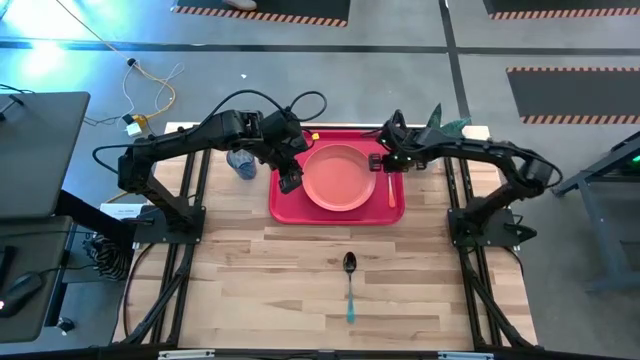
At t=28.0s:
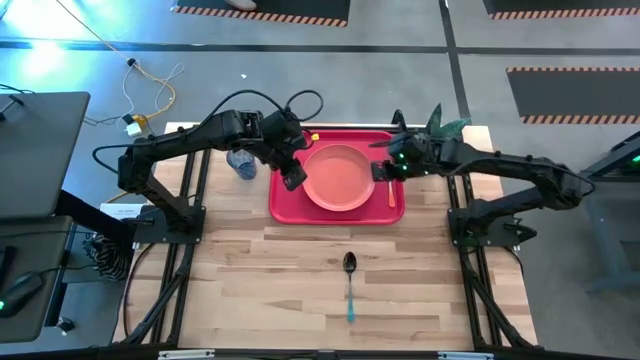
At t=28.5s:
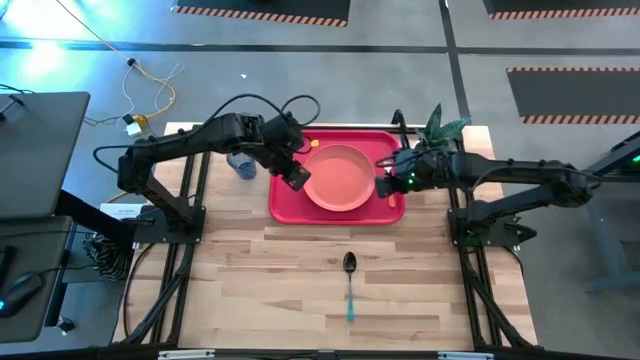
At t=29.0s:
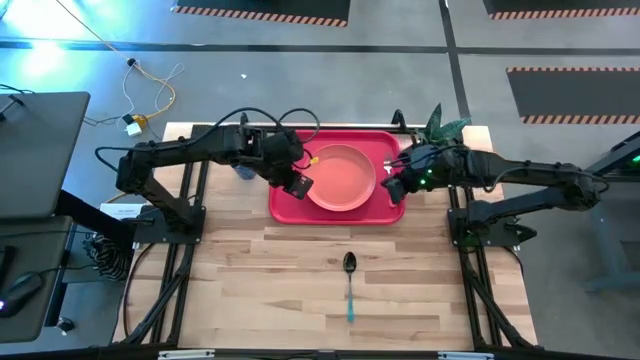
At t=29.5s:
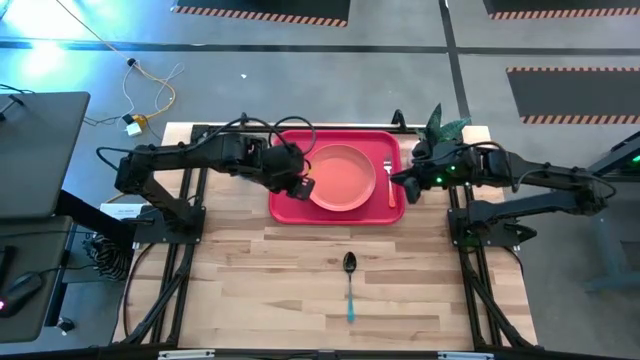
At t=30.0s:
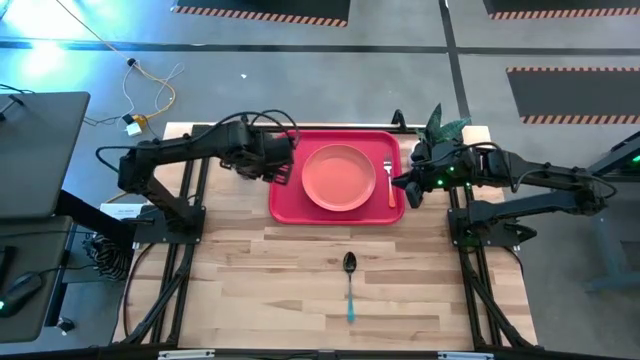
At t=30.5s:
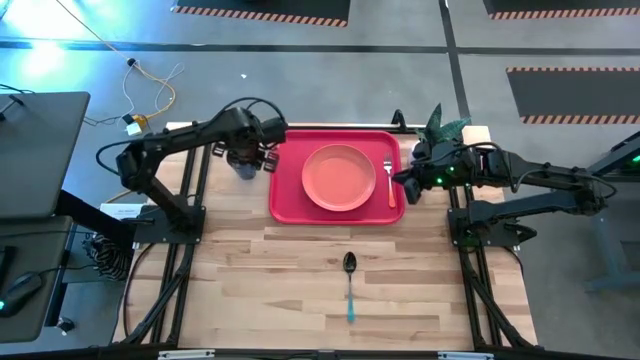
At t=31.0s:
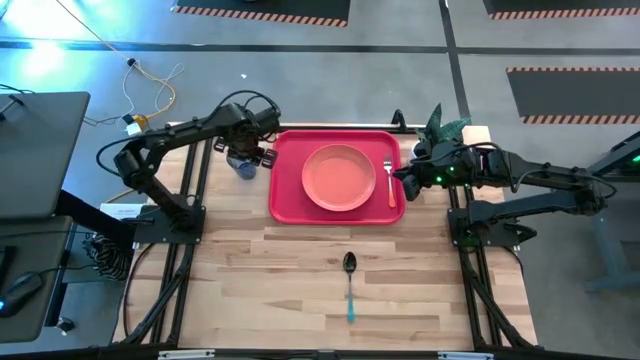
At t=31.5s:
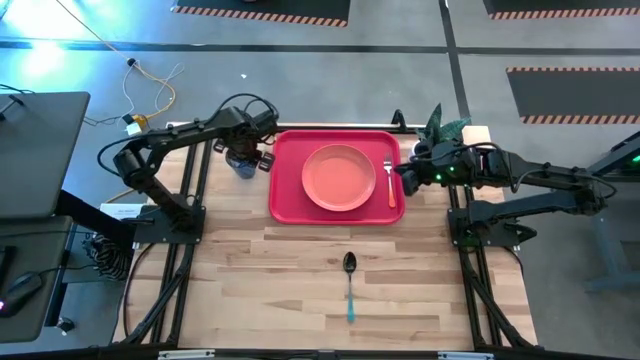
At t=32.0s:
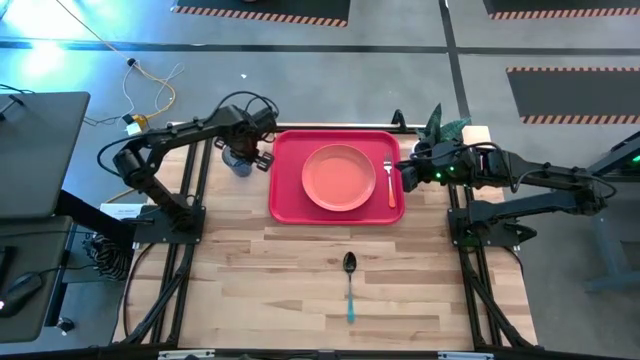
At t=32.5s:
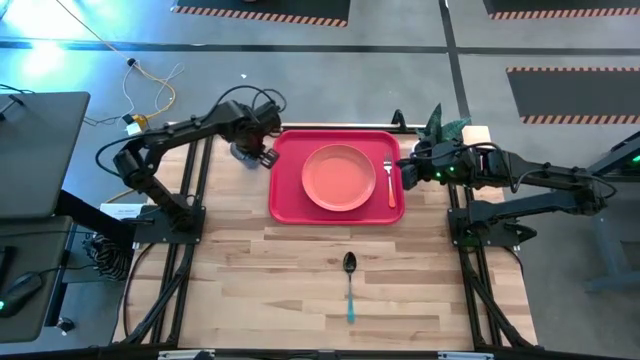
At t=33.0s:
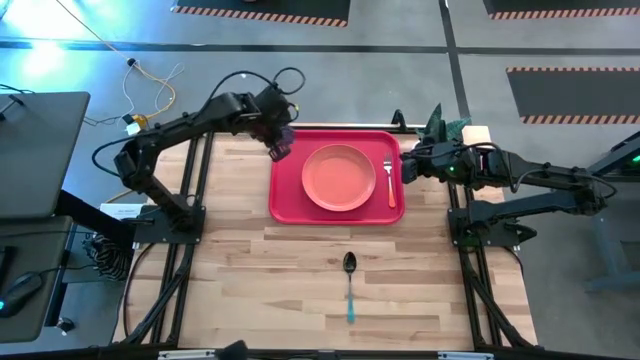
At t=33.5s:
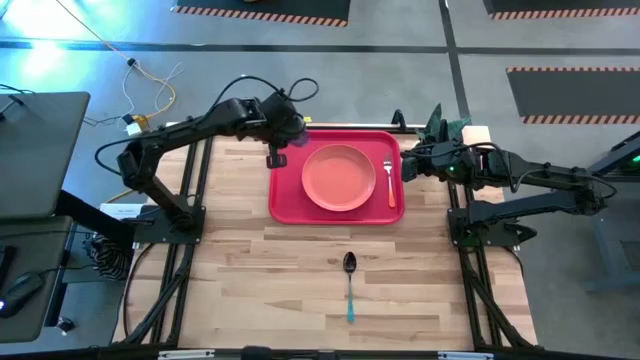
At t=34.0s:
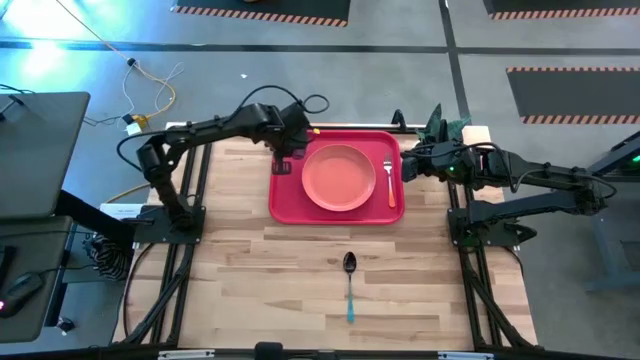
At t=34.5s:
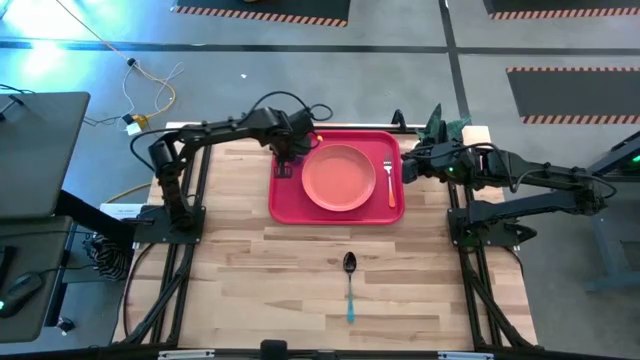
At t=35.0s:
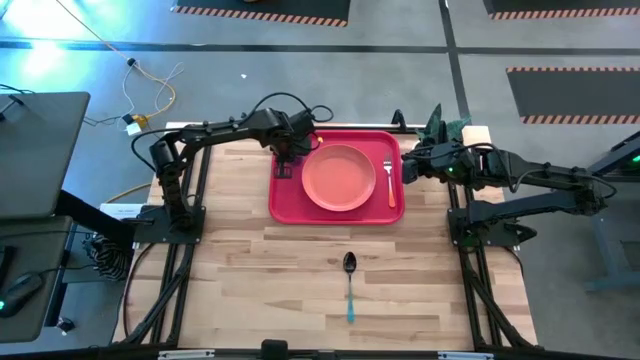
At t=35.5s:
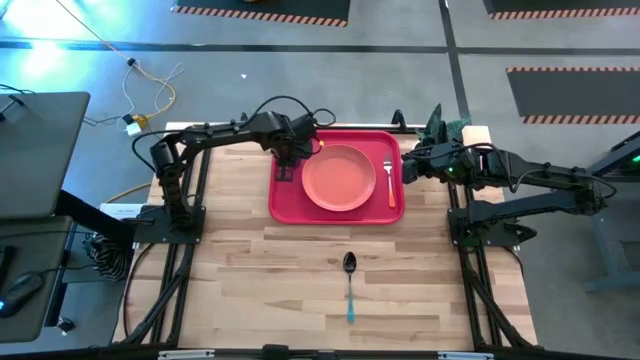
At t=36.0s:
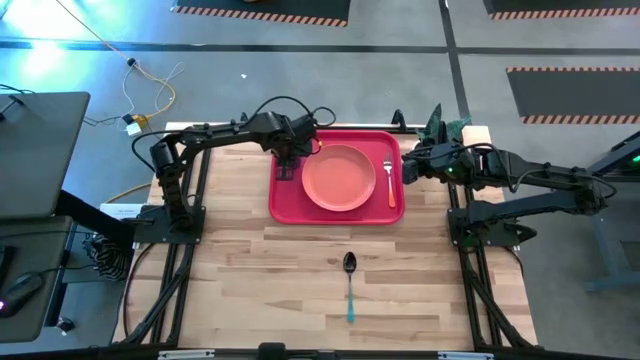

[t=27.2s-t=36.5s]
Task: Pick and place plate/cup/fork/spoon on tray
Put the blue glass on the top left of the red tray

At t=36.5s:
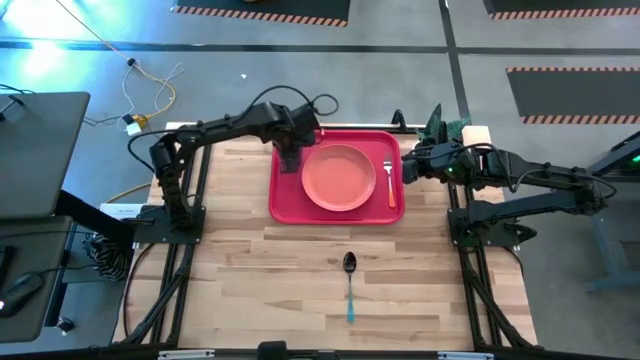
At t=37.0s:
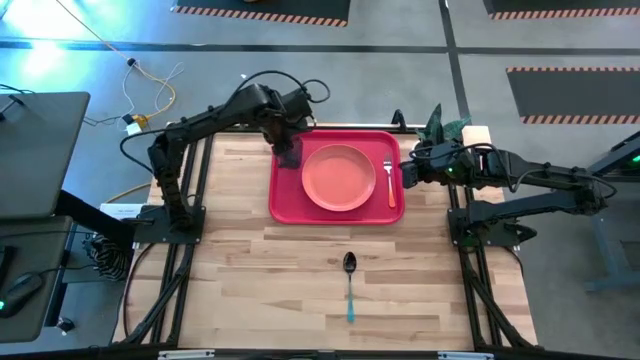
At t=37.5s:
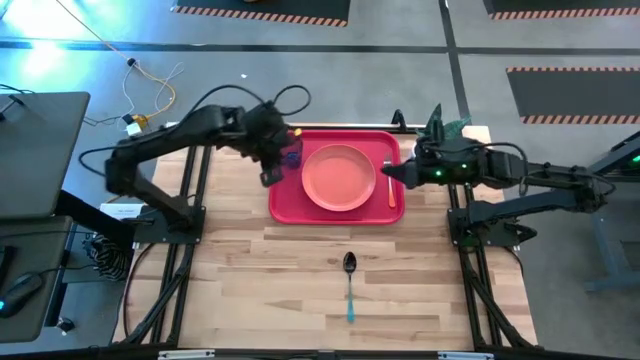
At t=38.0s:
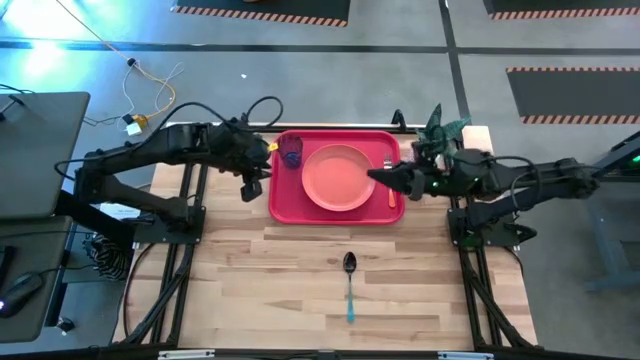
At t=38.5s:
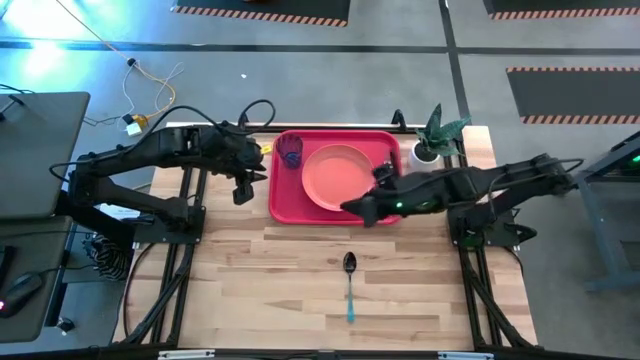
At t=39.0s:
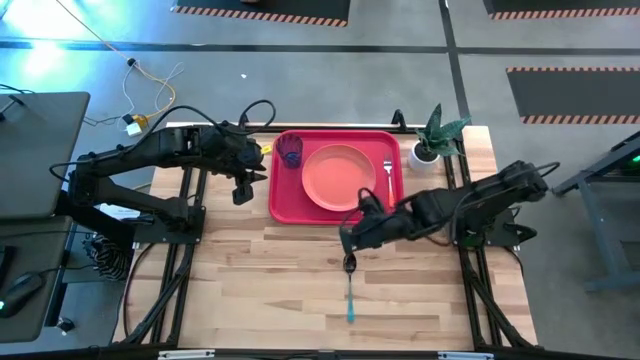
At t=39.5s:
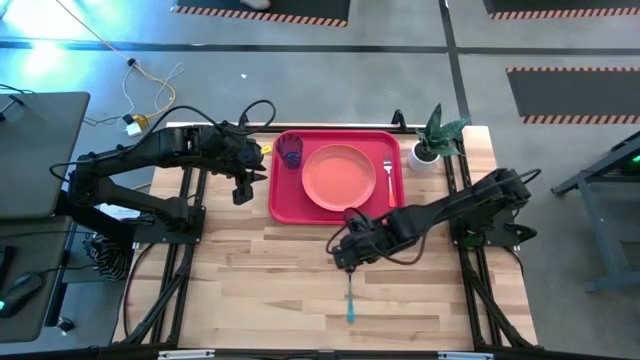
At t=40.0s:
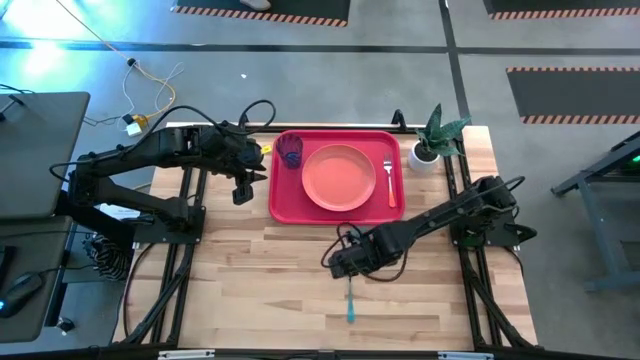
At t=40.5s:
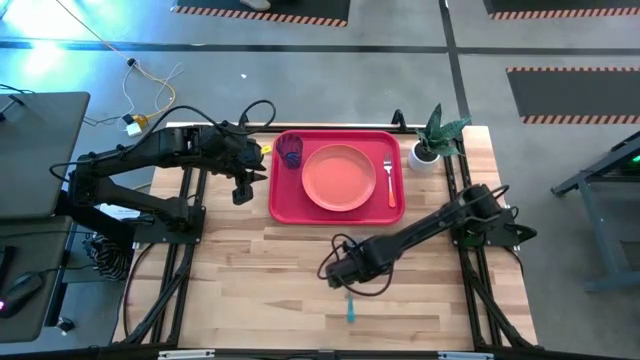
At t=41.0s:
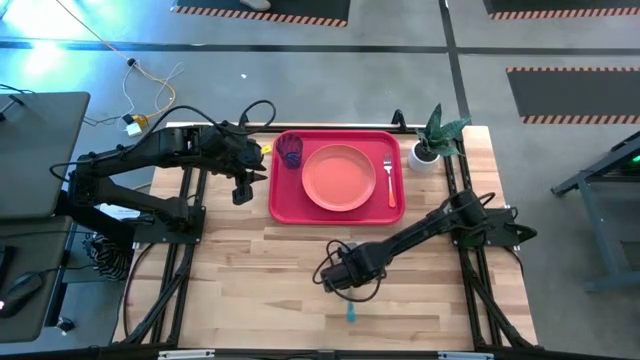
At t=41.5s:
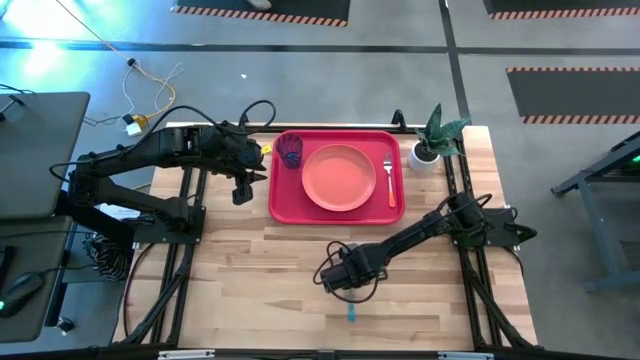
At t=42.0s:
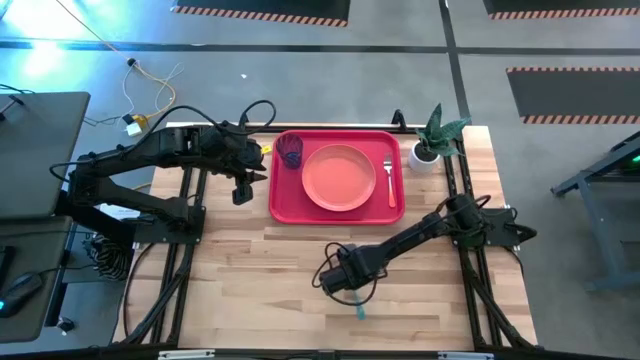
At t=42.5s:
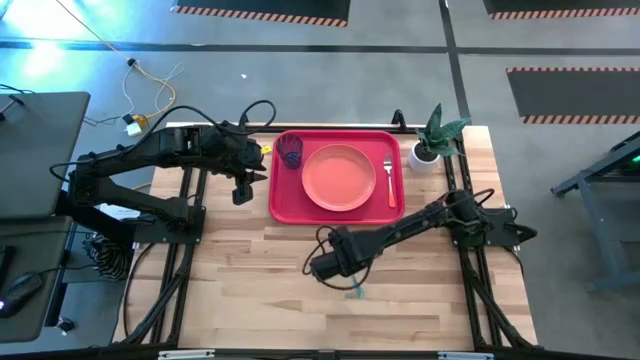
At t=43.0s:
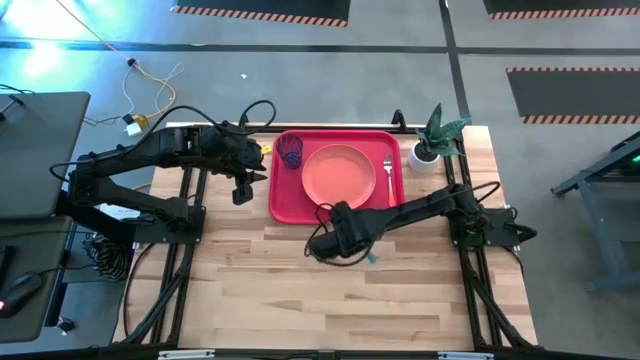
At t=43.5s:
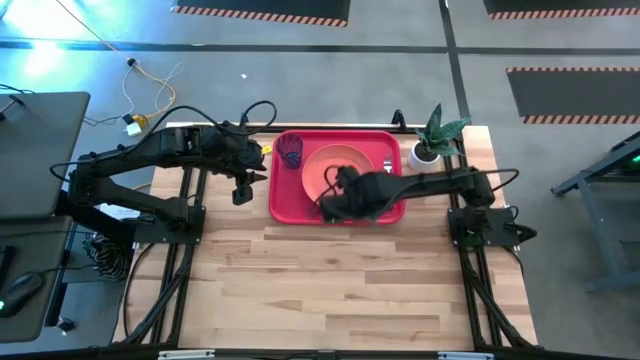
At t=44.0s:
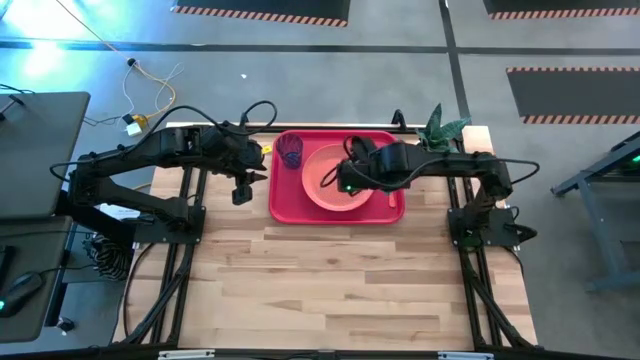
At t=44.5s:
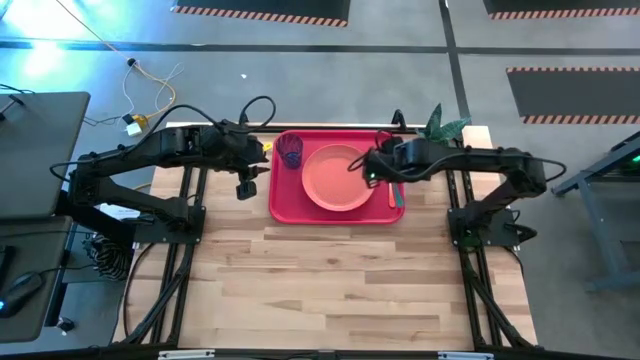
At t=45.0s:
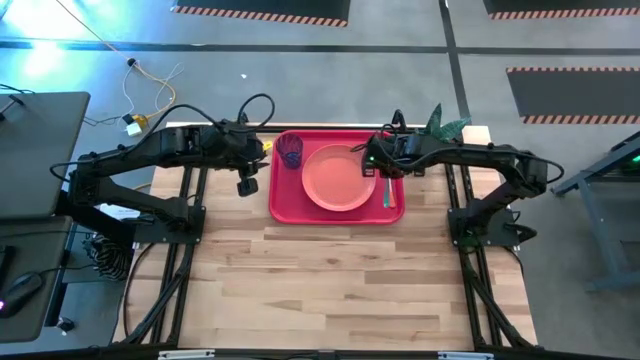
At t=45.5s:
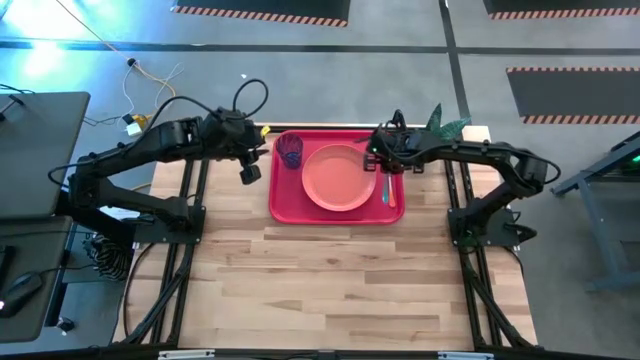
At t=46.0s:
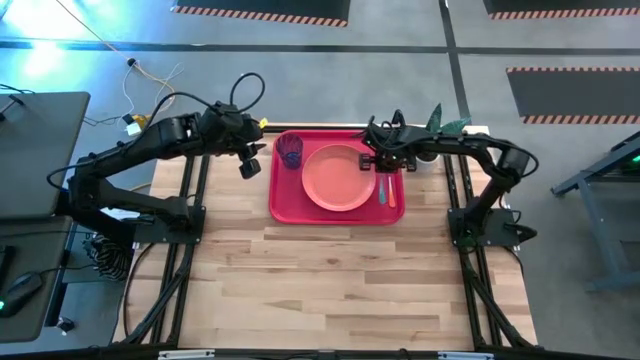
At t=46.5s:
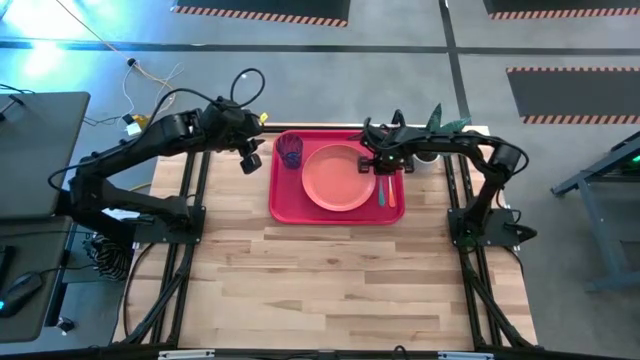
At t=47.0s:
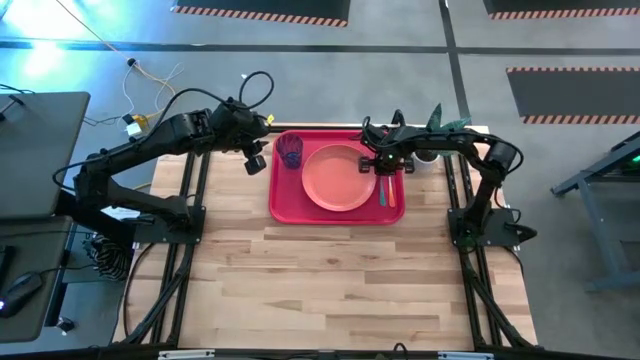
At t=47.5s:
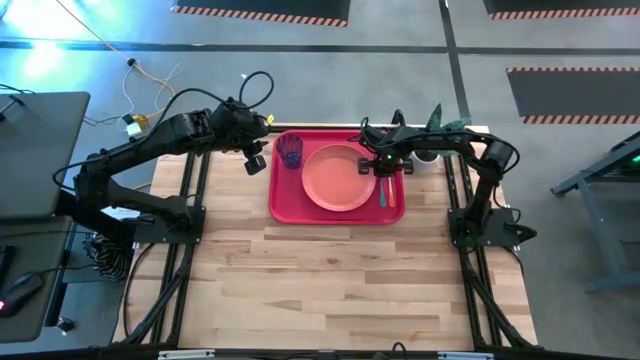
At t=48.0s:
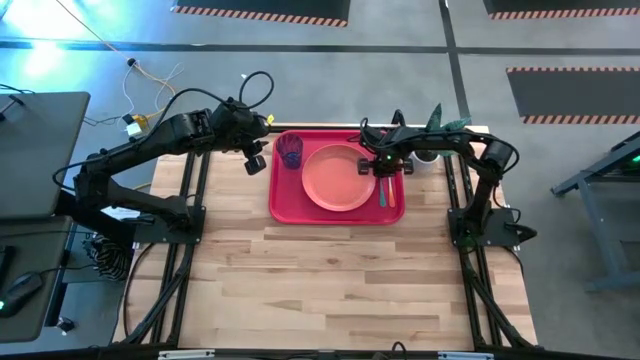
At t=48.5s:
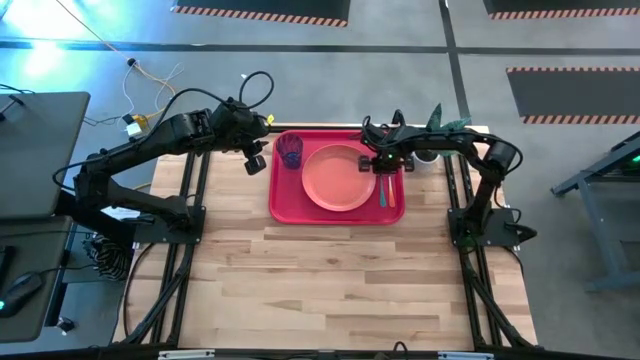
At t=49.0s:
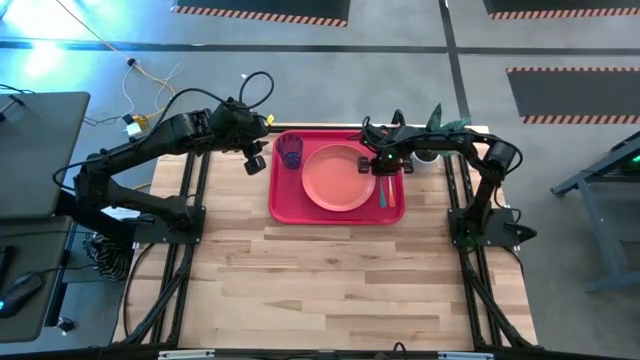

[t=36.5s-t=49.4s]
Put the blue spoon to the left of the orange fork on the red tray
